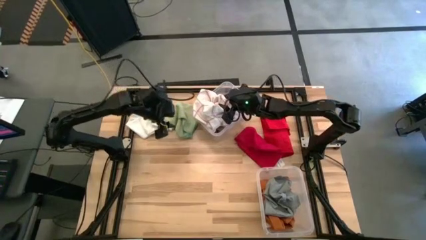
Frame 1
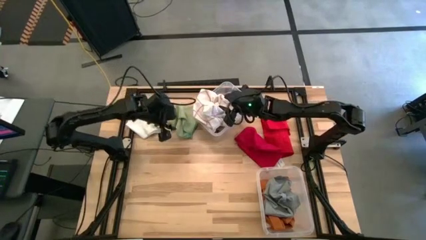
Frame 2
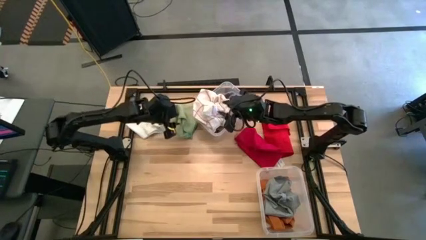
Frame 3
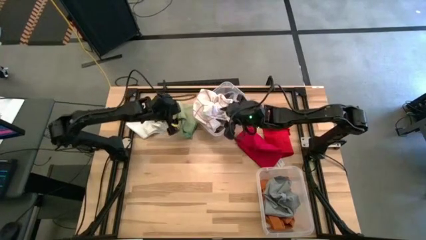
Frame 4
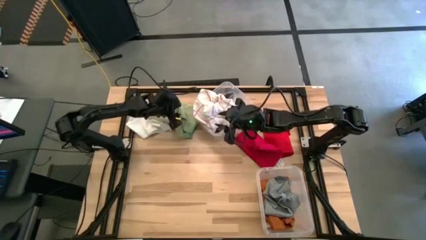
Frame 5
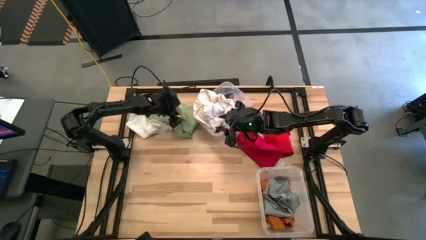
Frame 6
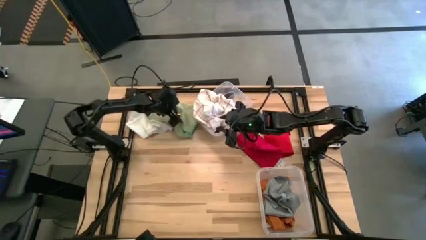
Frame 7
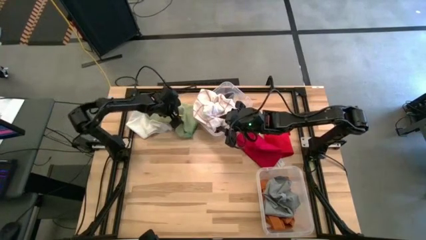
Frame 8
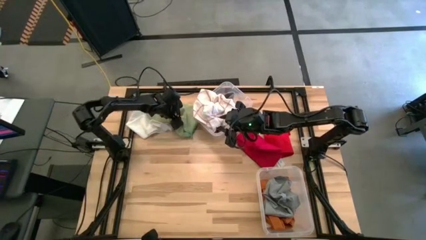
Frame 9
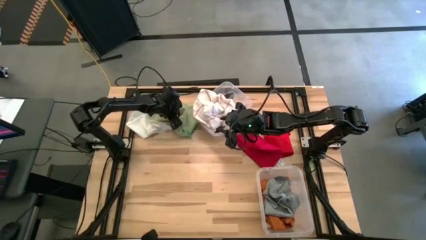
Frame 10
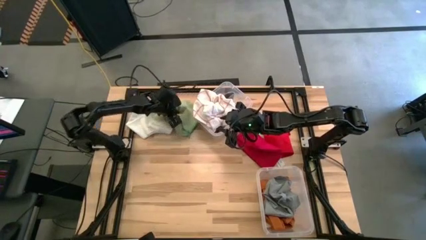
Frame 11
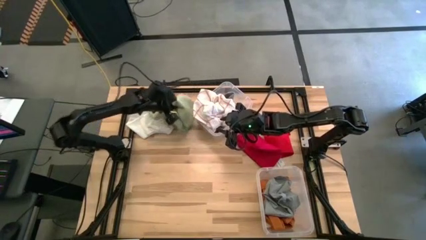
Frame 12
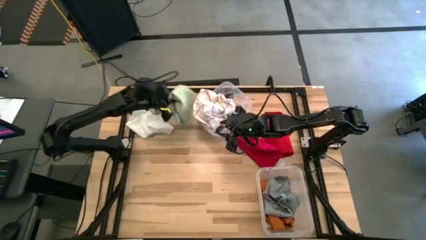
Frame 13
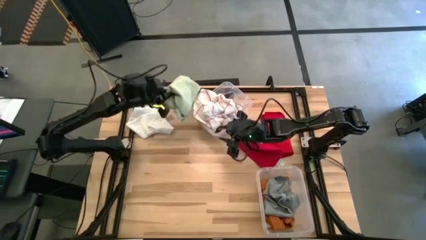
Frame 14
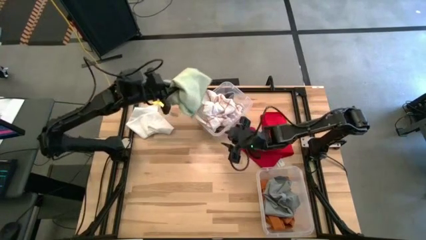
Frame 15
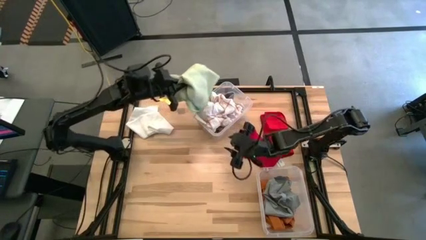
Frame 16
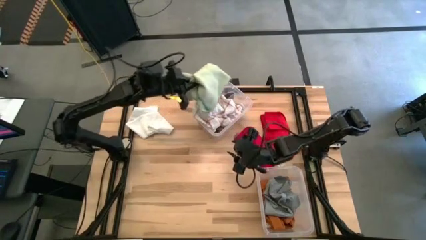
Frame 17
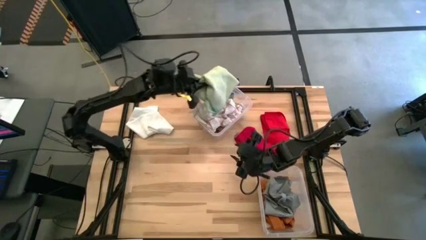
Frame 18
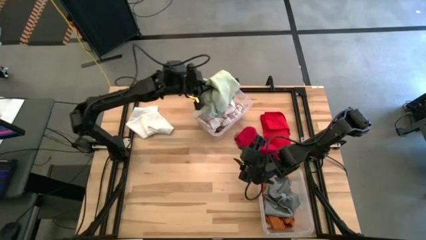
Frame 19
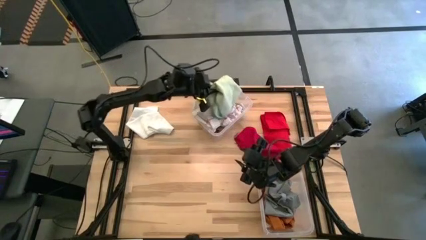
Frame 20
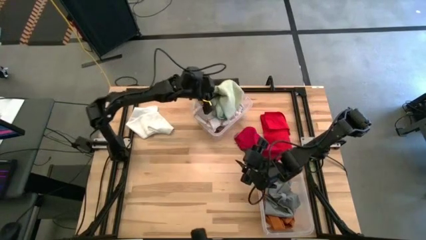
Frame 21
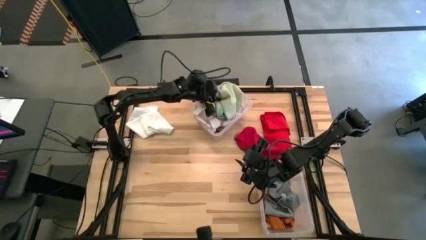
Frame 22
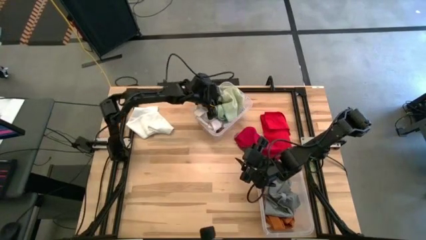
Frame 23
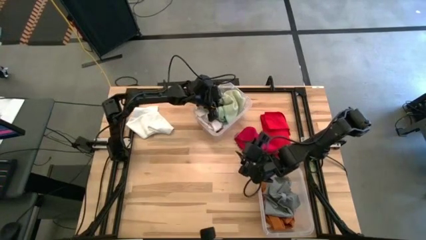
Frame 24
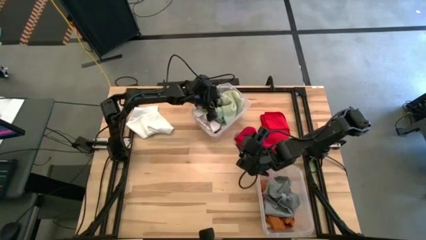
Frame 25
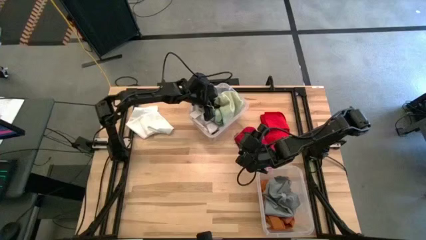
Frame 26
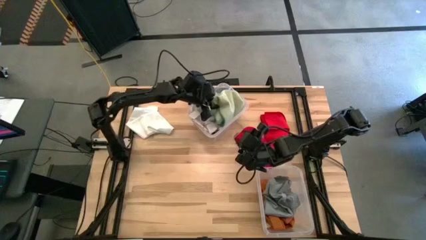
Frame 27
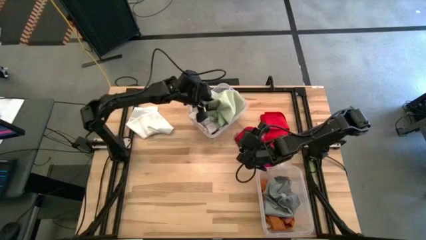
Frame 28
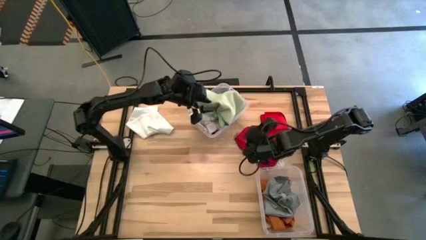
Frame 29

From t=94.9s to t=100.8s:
Task: Sort towels by color in basket
Put the green towel into the top transparent bin

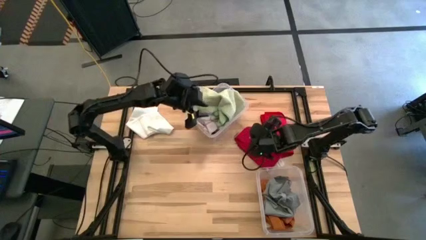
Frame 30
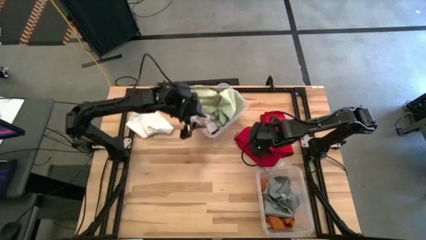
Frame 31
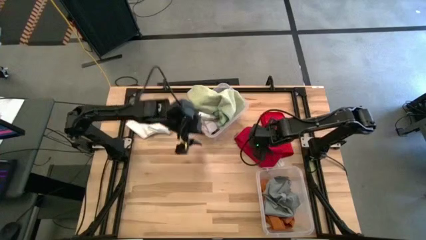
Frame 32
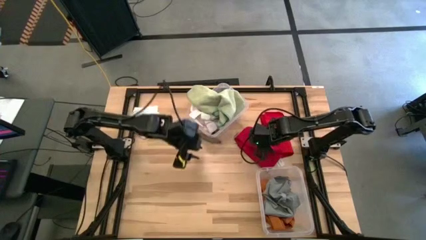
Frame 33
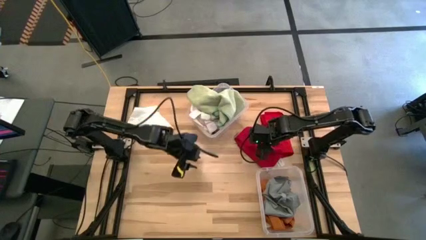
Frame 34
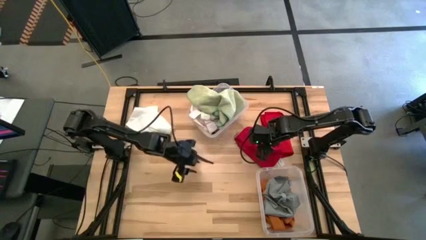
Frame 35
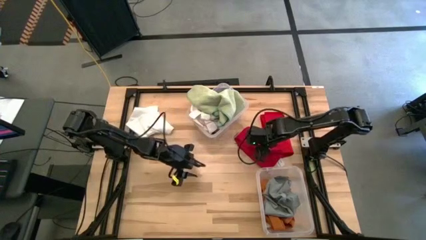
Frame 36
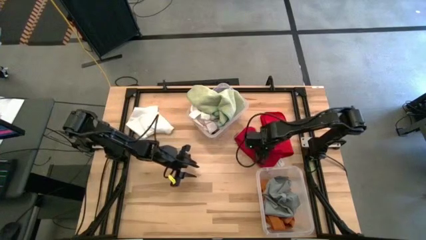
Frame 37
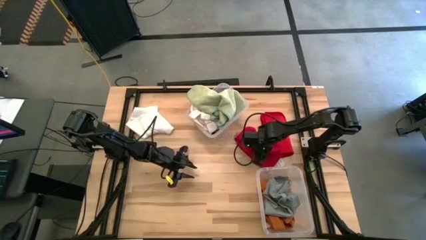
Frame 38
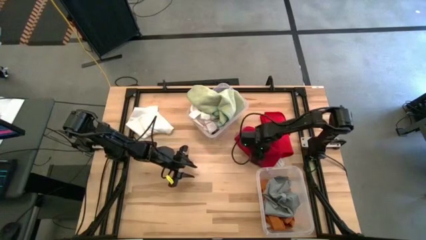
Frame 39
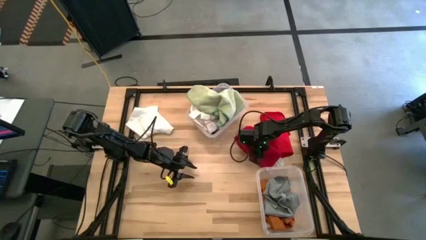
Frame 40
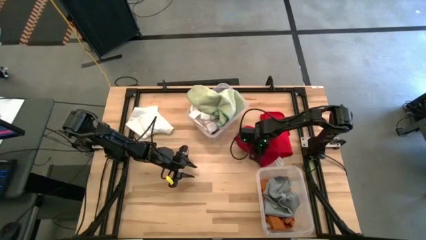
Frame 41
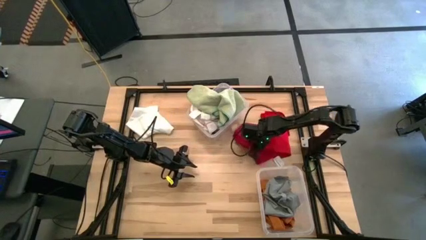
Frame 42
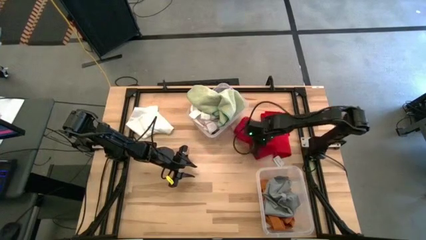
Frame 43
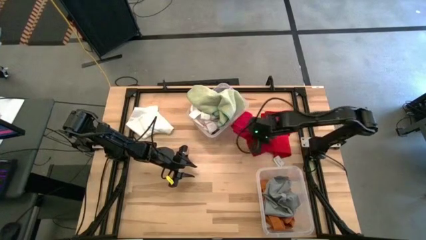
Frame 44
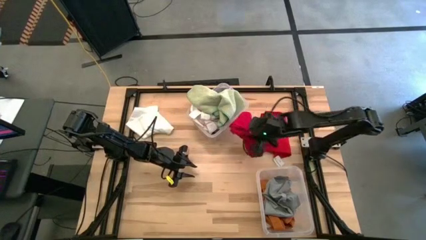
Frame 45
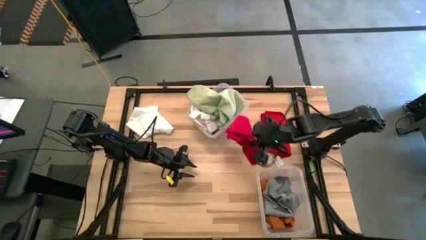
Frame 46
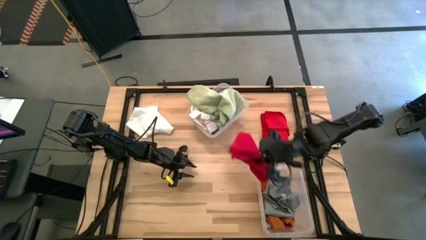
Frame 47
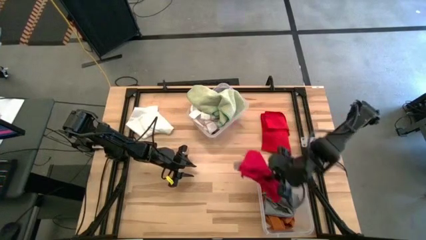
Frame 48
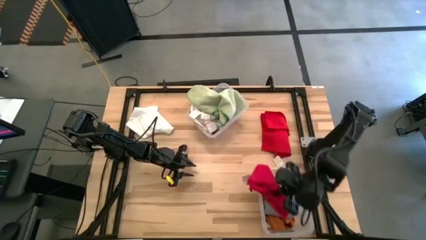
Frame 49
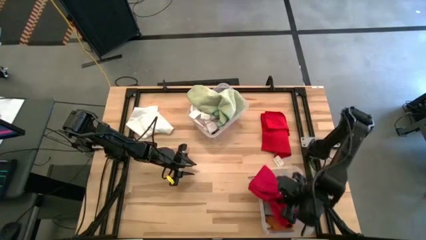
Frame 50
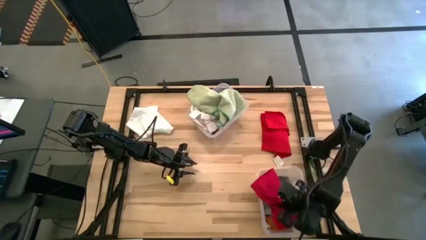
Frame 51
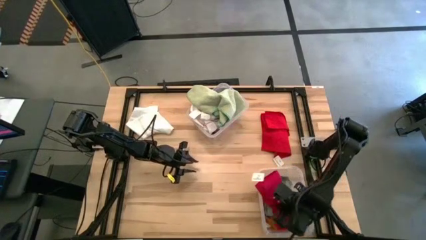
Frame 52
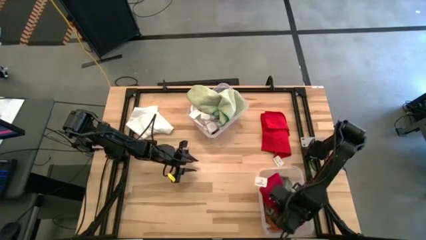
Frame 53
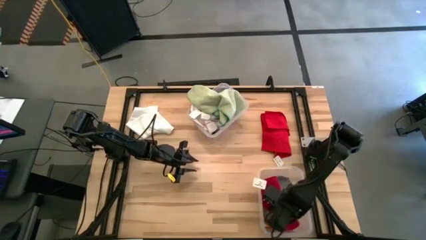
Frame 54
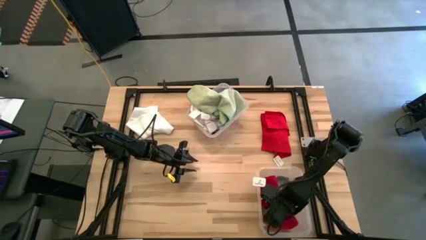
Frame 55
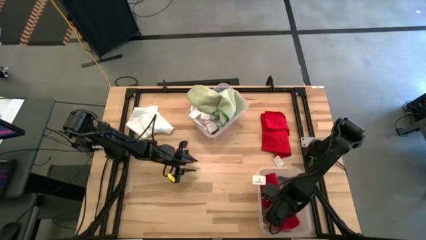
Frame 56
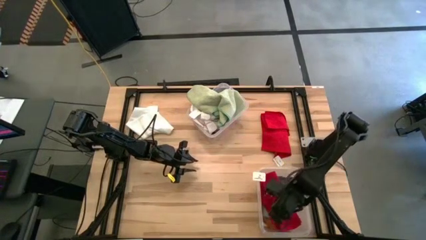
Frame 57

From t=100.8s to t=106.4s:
Put the left red towel into the bottom transparent bin

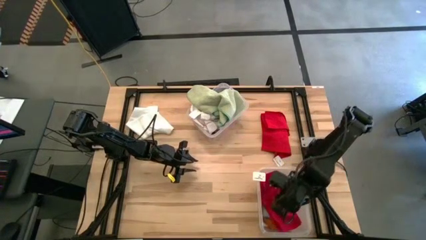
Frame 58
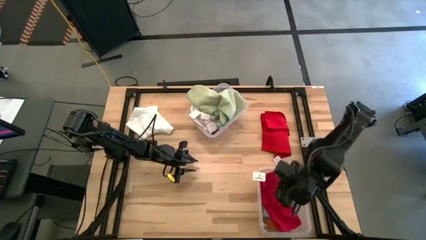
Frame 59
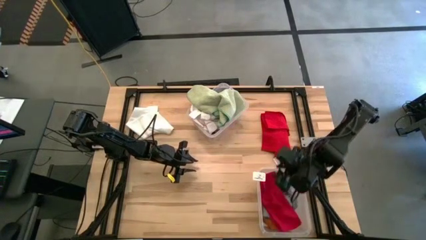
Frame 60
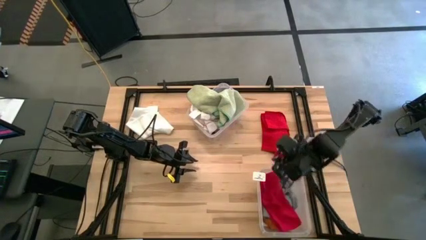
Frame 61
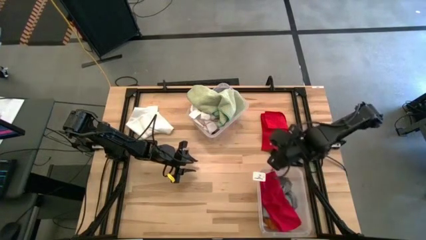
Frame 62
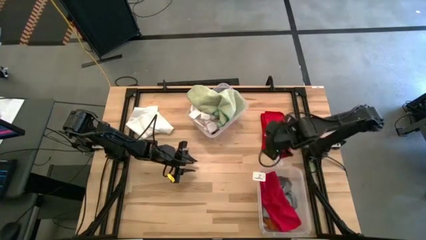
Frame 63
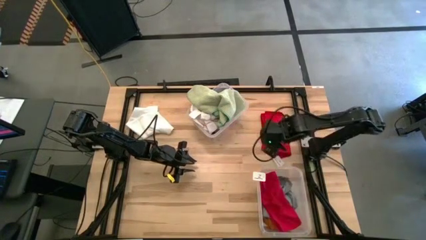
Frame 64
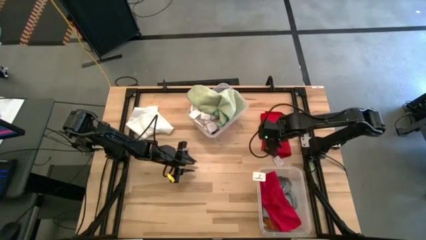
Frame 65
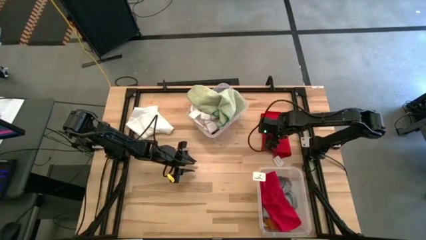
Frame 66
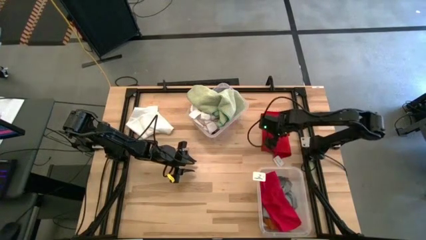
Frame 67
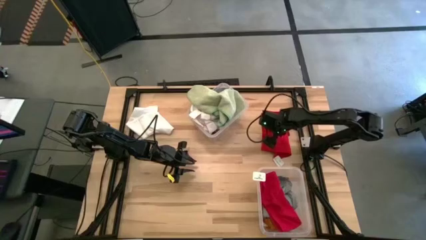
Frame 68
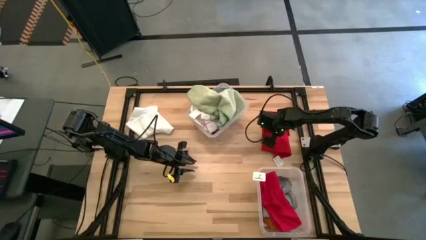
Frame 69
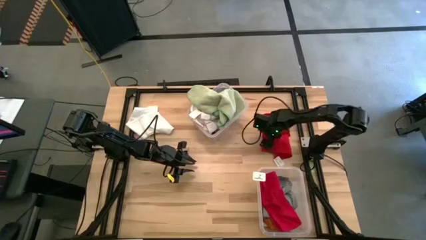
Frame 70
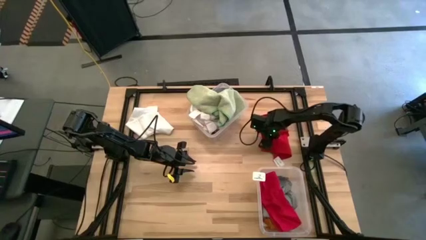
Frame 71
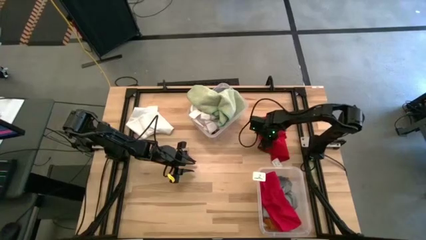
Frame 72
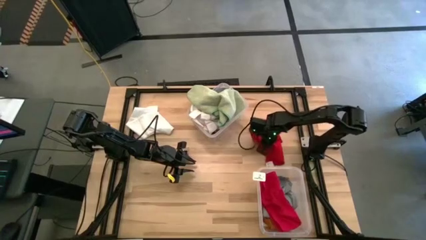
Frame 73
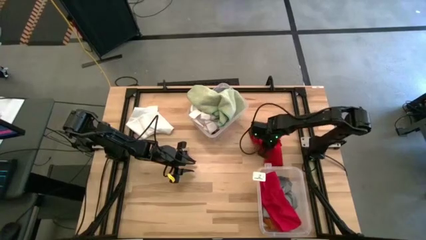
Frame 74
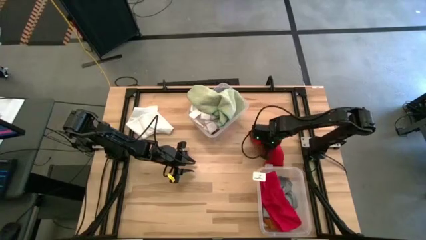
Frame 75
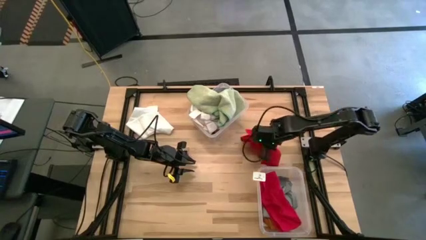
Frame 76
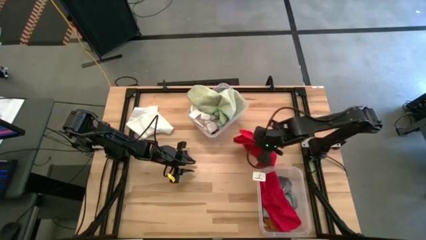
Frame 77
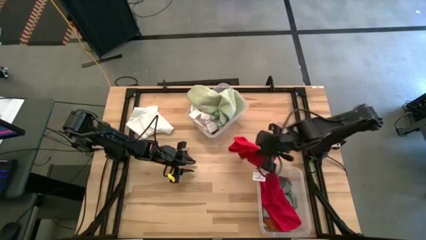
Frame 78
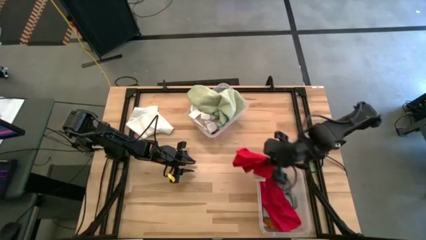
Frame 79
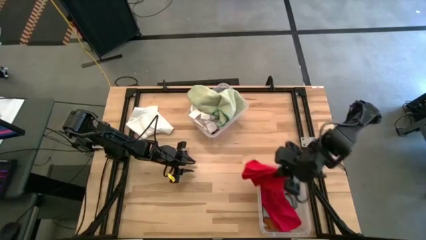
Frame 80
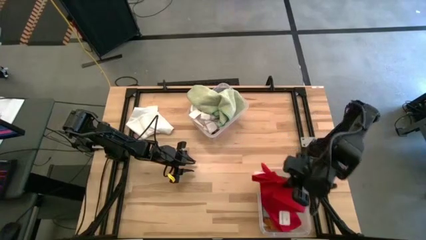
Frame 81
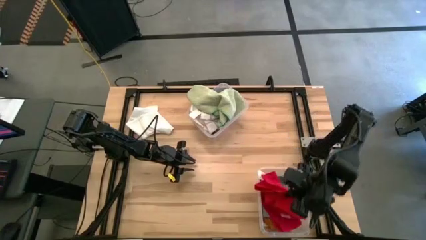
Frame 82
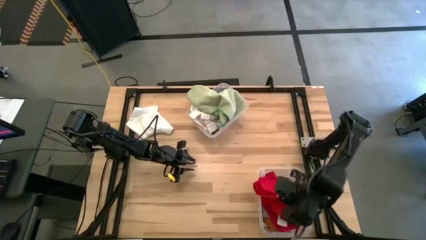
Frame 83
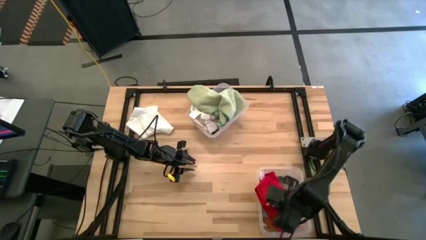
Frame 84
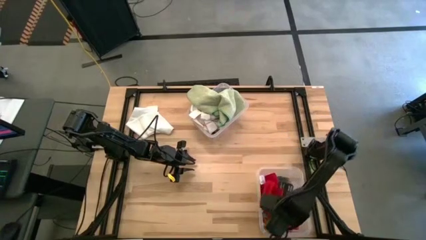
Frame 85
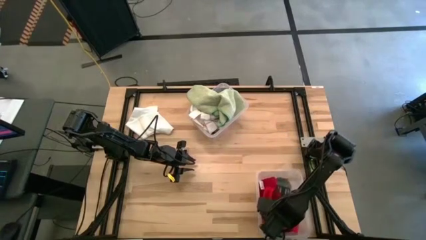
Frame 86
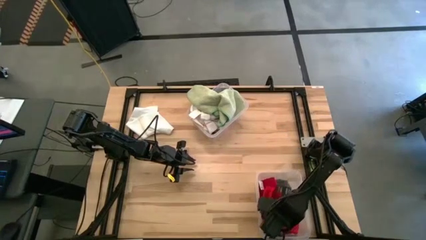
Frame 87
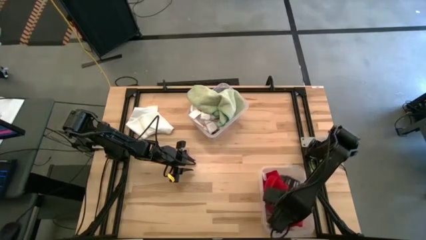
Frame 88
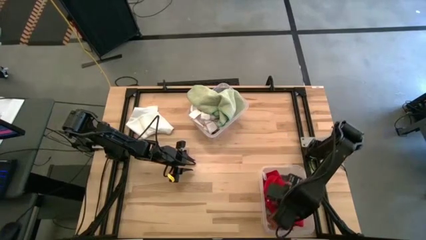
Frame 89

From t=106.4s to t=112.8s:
Put the red towel into the bottom transparent bin

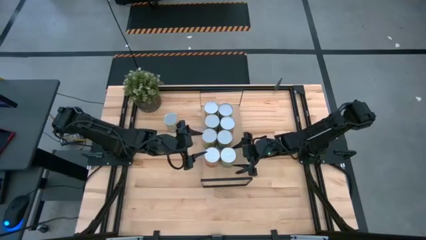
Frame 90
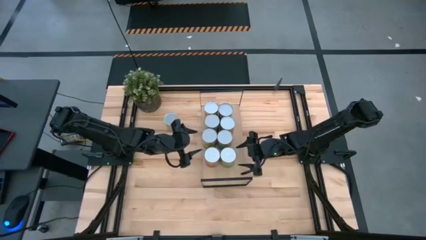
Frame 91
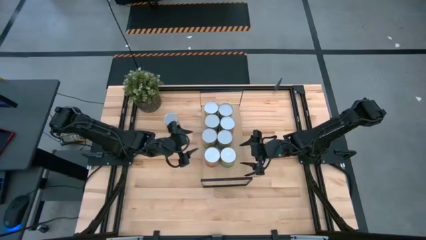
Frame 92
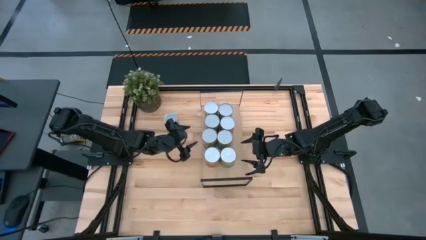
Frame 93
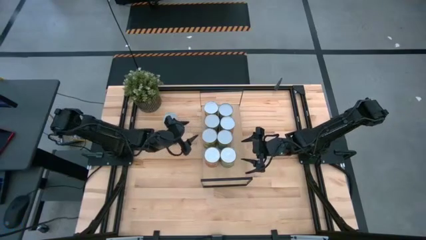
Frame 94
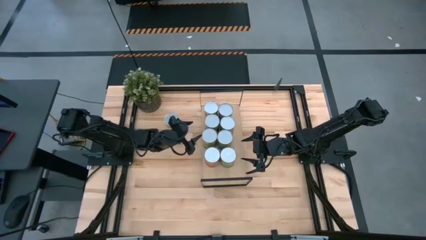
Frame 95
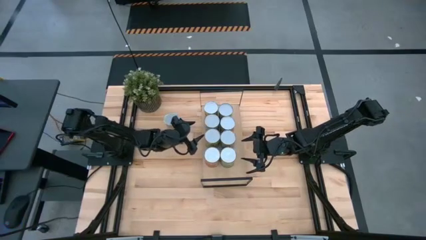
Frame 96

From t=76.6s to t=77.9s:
Task: Pick and place cans onto a shelf
Adjust the canned pears on the shelf
